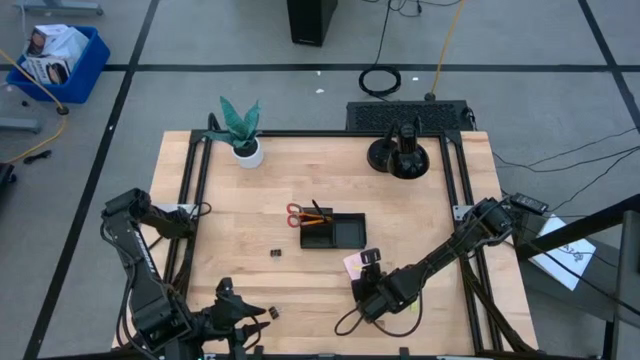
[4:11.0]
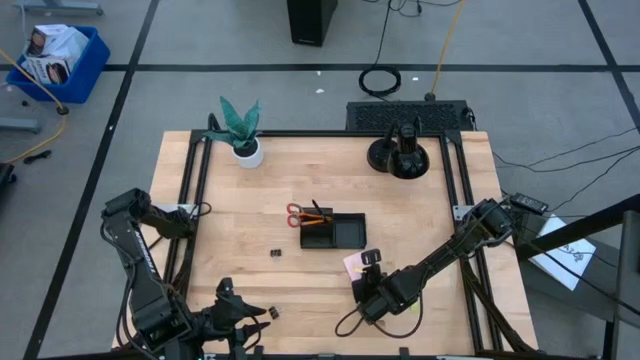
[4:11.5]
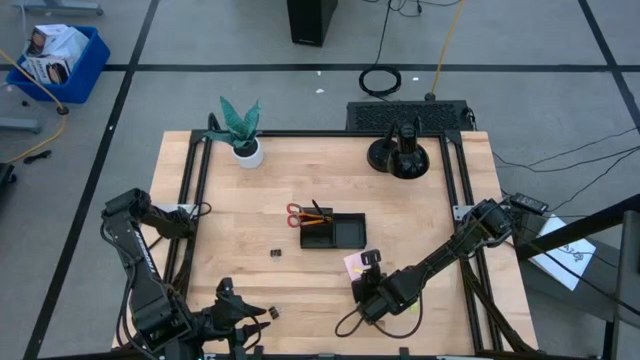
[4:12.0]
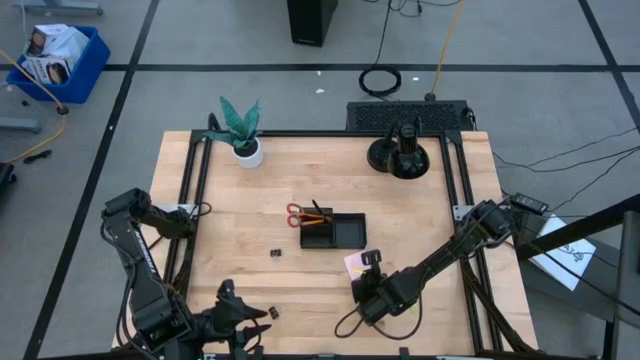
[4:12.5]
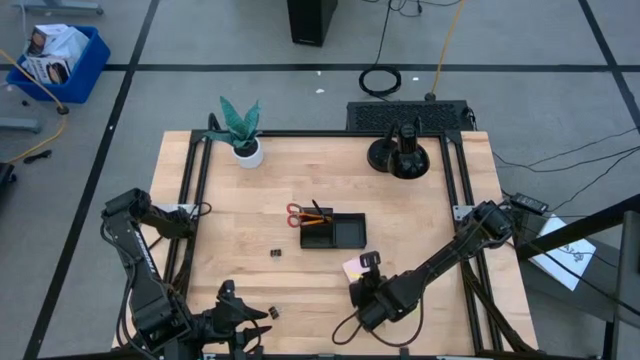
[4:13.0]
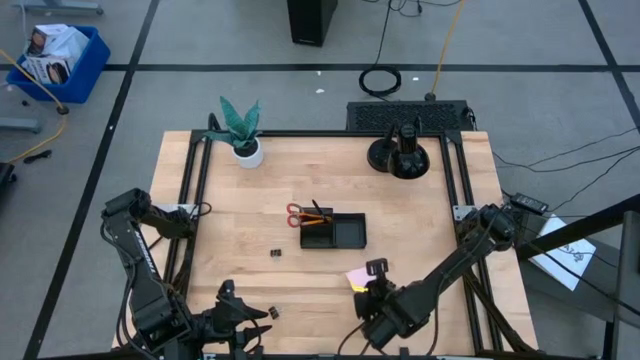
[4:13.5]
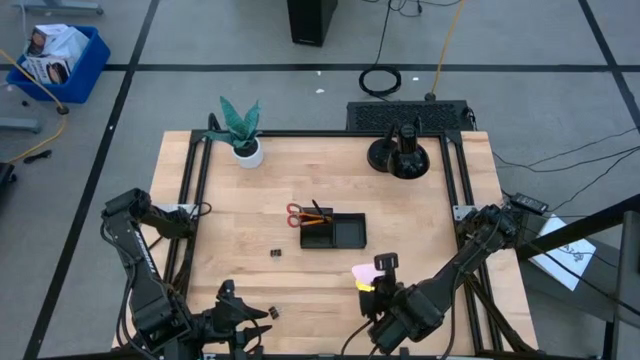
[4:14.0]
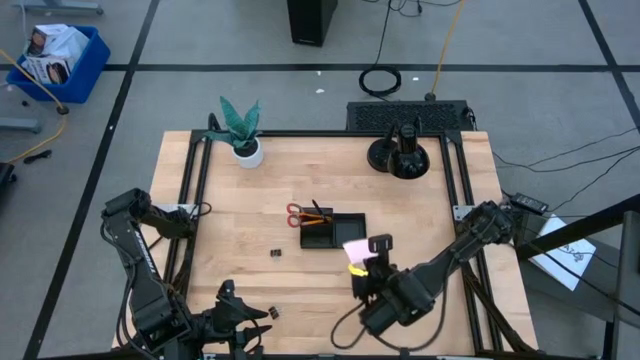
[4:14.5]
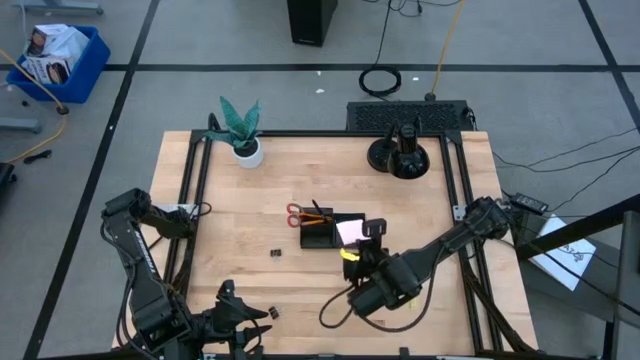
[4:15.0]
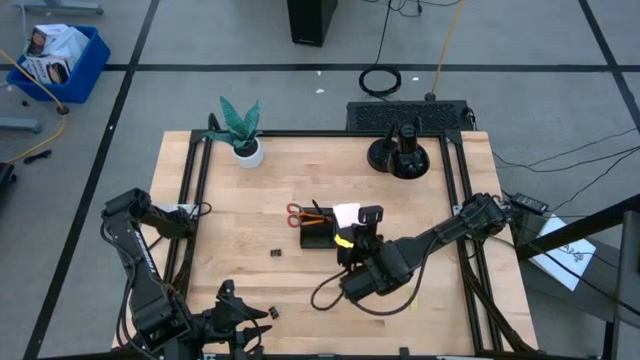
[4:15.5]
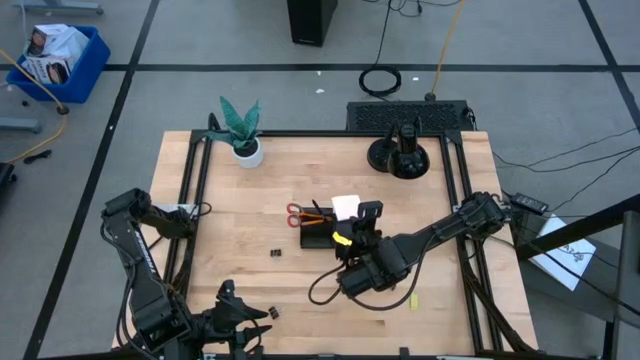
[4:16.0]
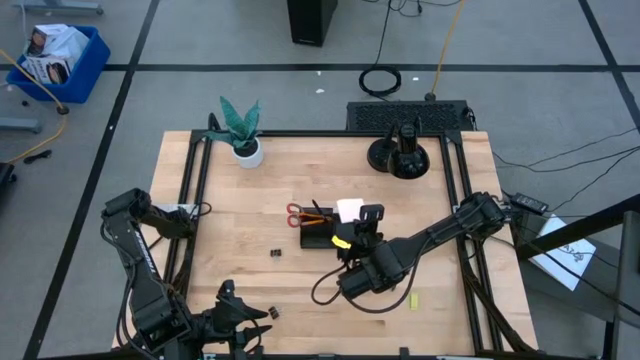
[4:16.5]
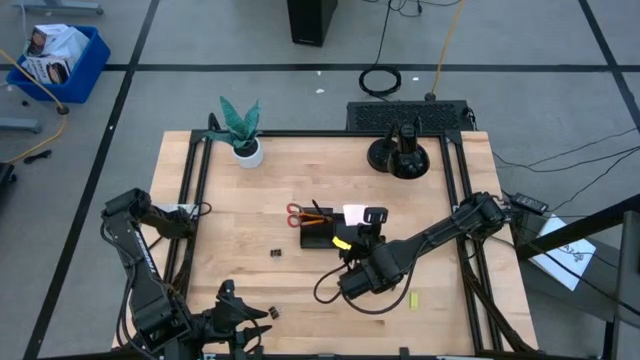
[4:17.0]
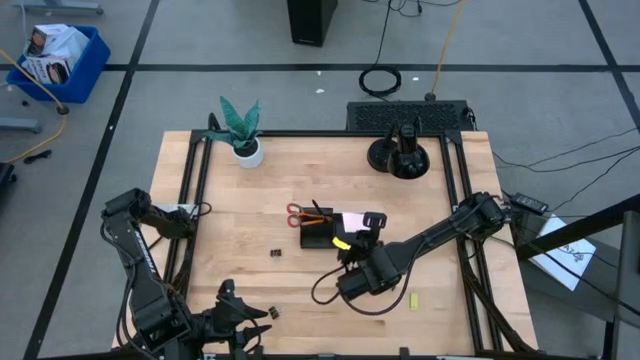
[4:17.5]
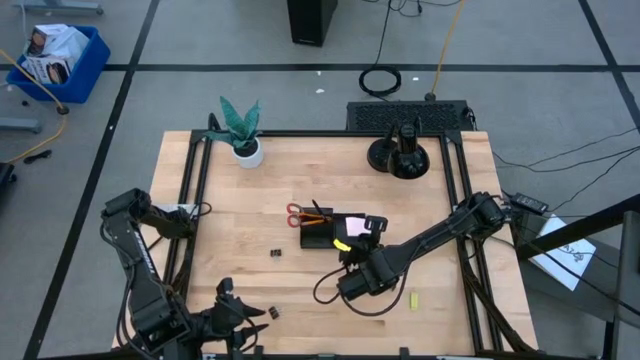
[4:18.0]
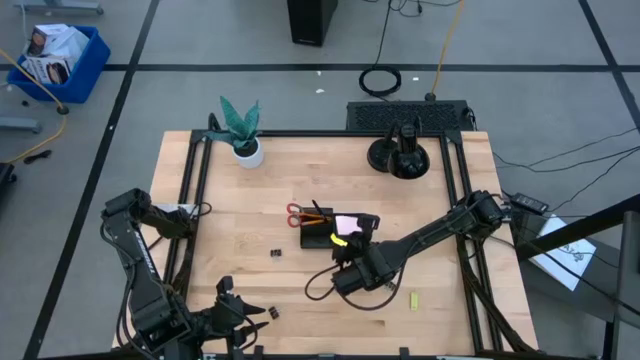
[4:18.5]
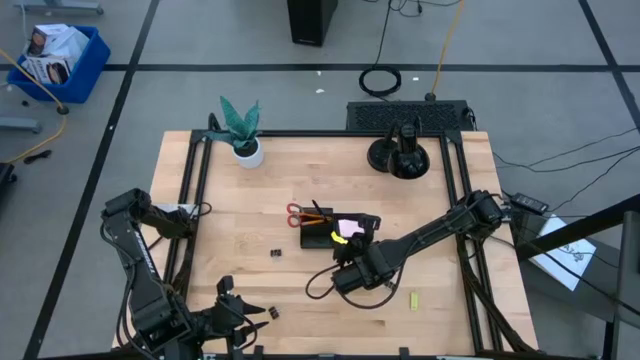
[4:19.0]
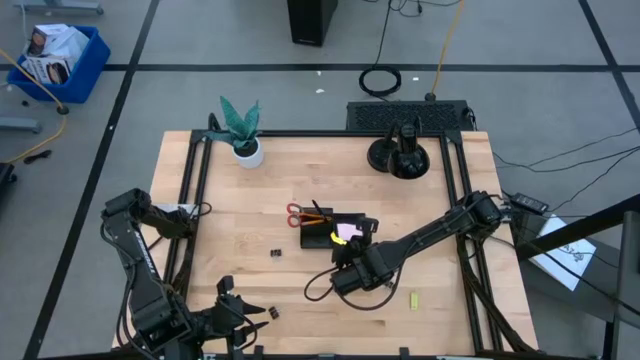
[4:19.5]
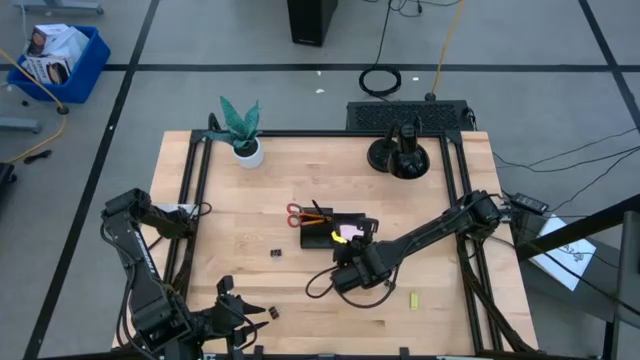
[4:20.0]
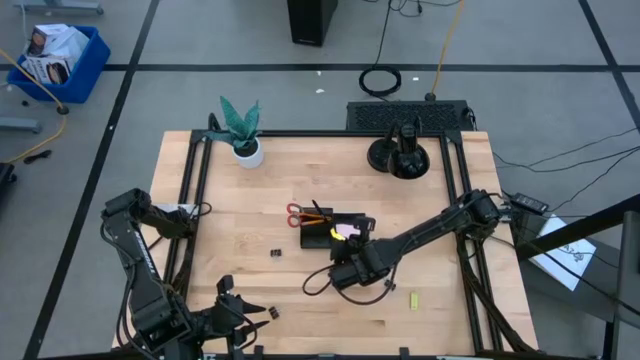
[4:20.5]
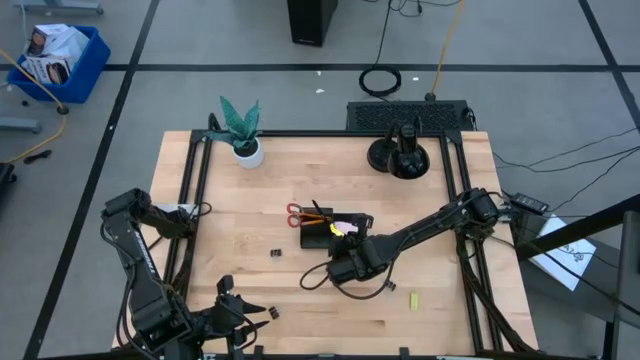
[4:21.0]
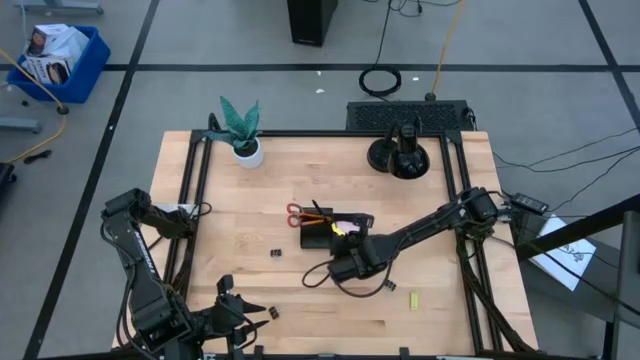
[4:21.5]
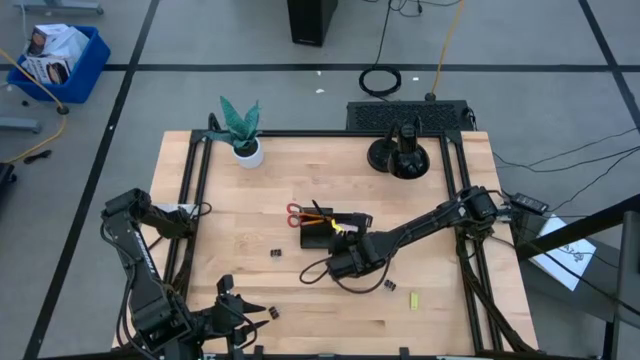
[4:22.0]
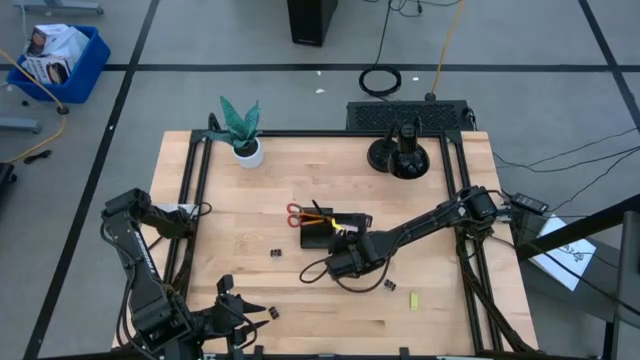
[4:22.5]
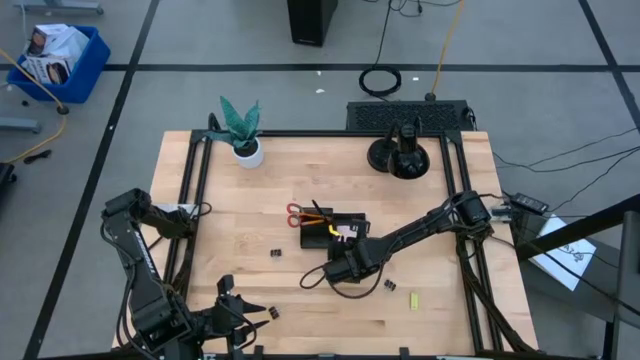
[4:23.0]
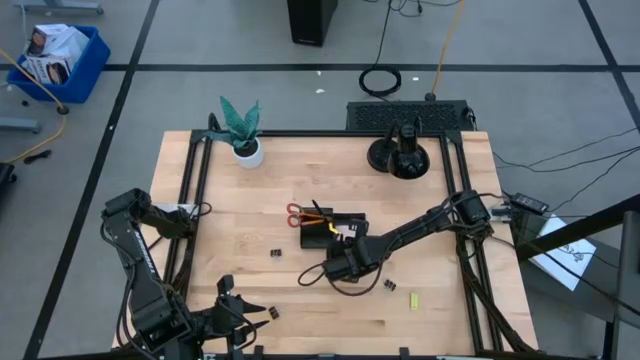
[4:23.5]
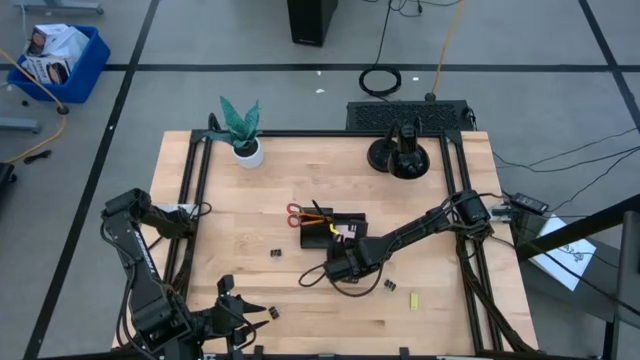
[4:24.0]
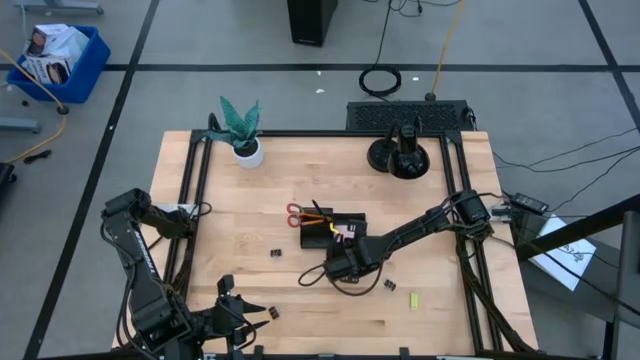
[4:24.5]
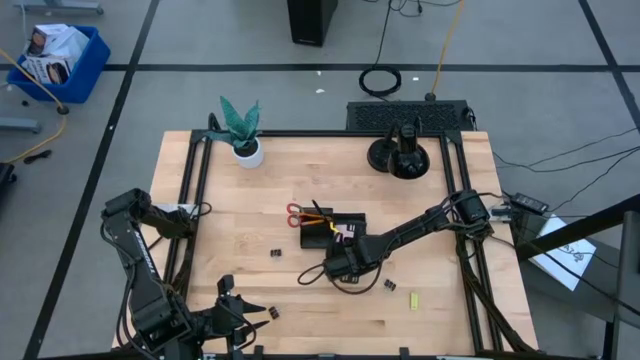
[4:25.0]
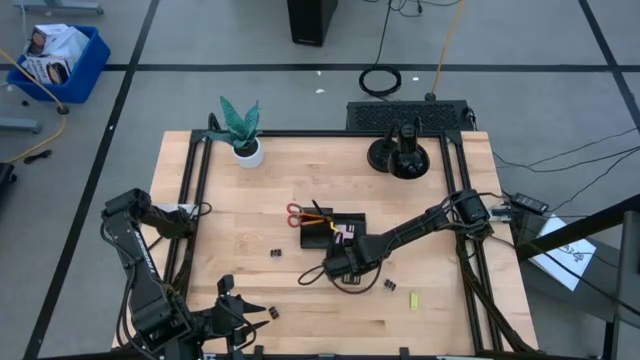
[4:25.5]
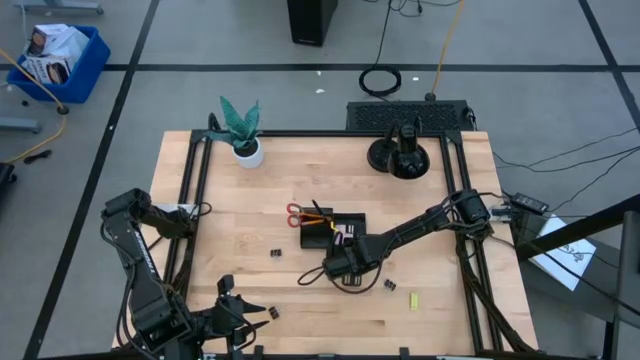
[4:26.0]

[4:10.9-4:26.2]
Task: Pick and place office supplies into organizer
Put the pink sticky notes into the desk organizer

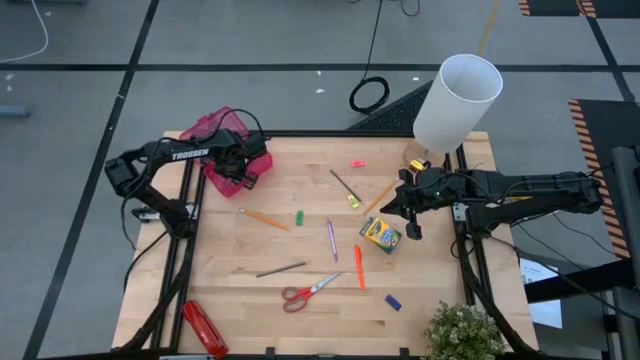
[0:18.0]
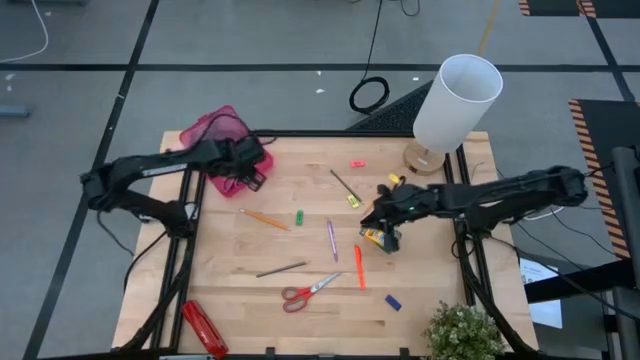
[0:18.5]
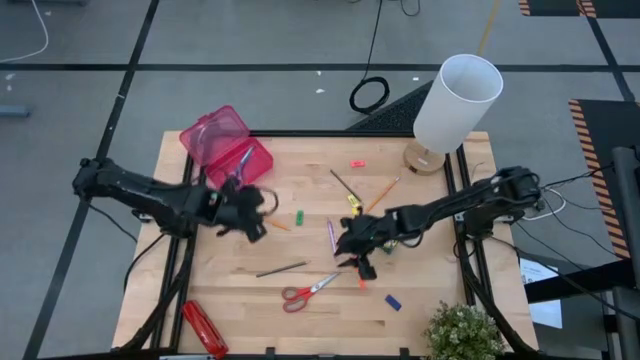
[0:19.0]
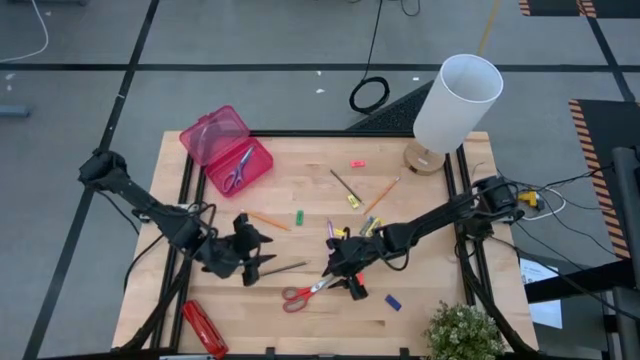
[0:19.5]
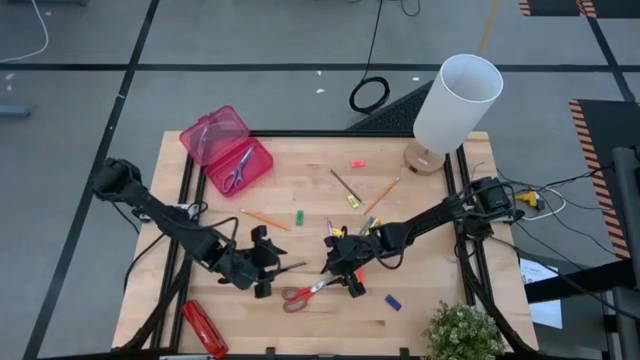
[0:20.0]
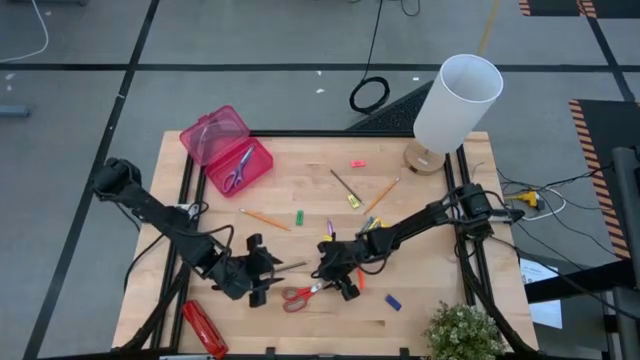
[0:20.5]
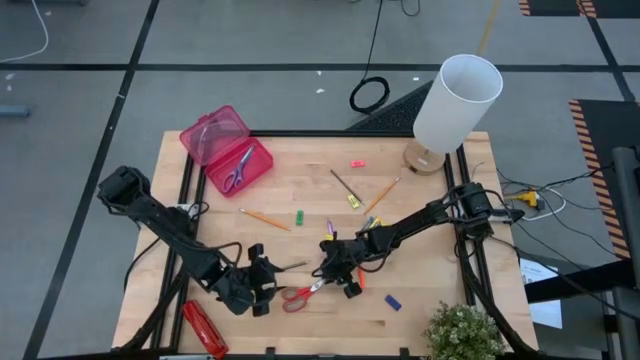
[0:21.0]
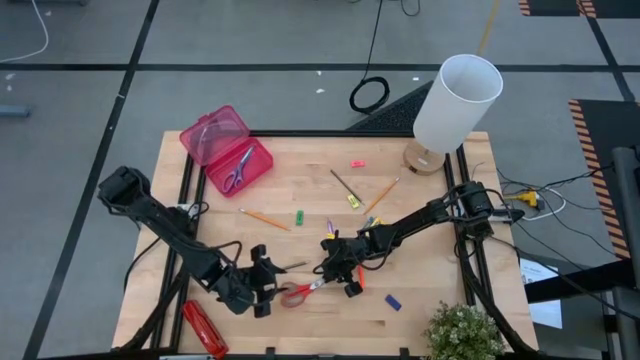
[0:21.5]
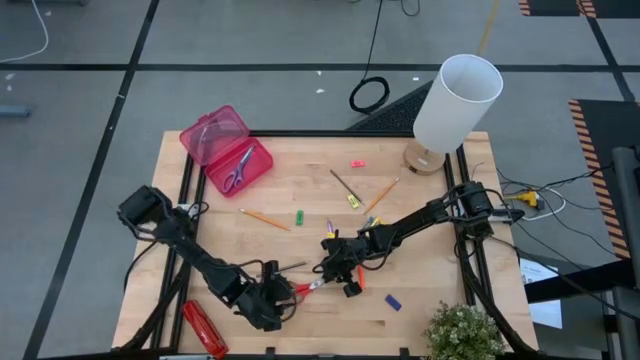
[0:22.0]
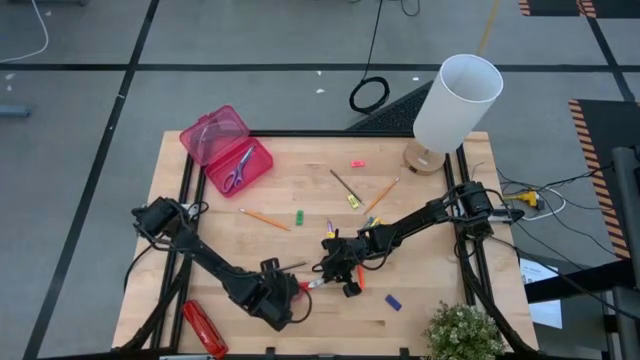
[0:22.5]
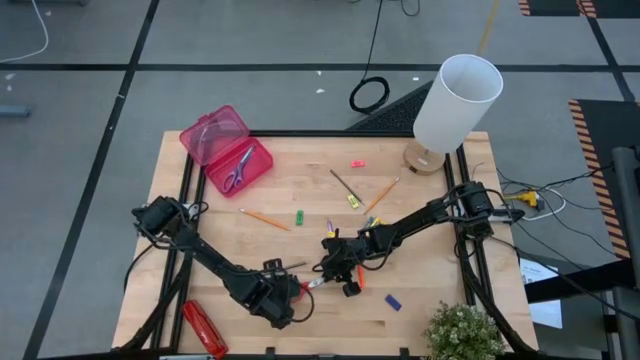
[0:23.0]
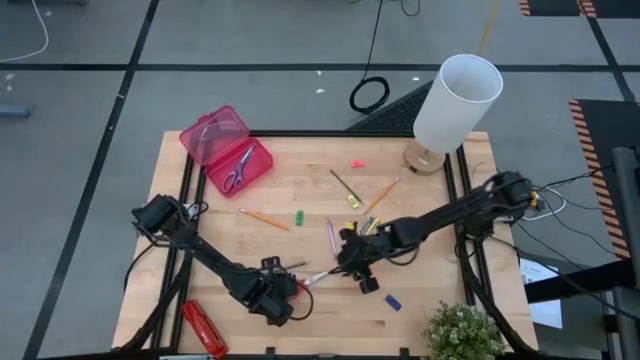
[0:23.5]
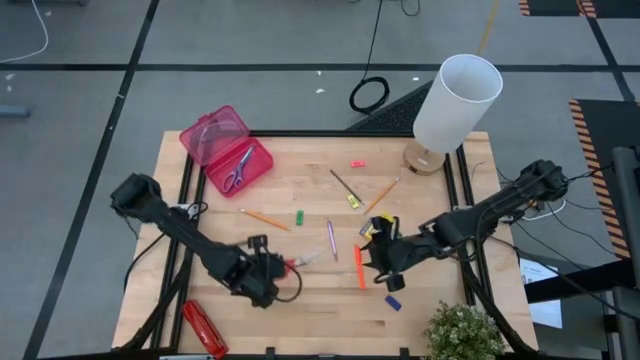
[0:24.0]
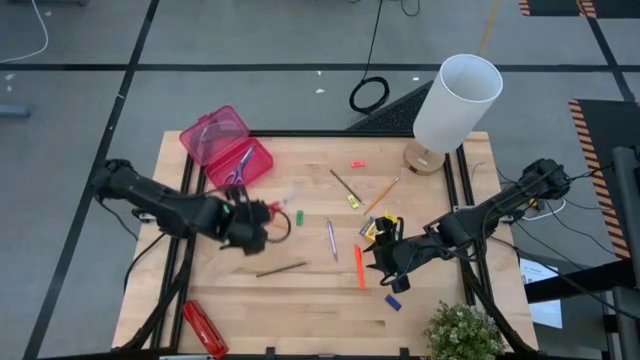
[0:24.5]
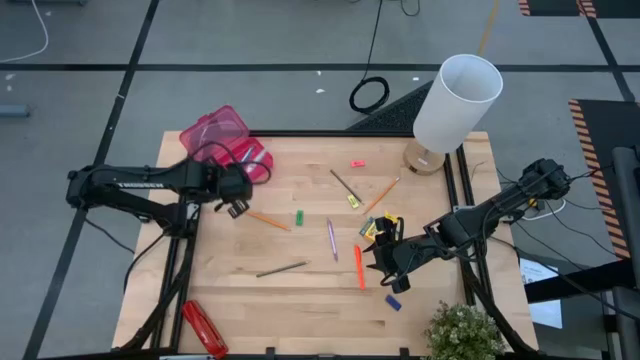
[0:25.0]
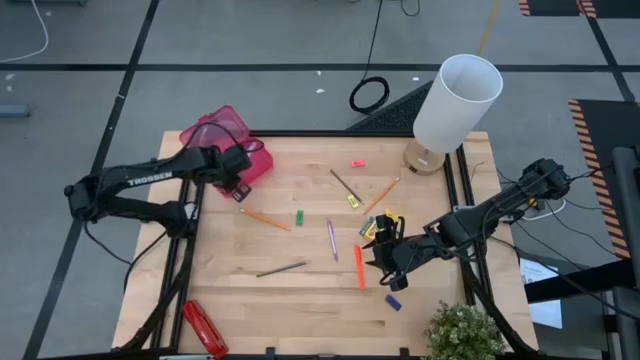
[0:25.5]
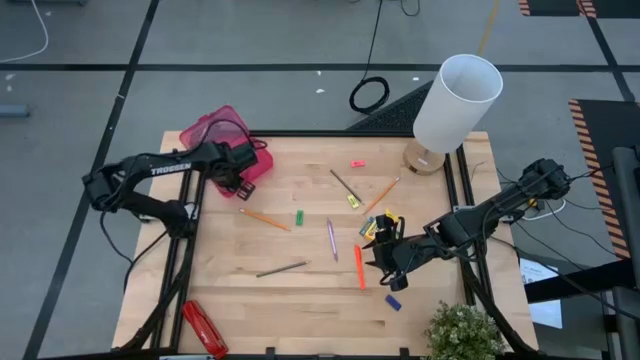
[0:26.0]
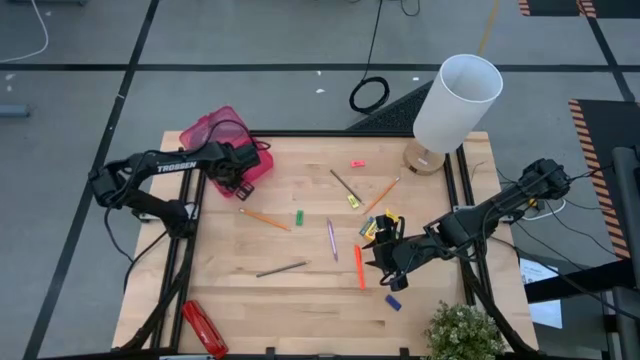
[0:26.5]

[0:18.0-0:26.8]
Task: Pack school essentials
Put the red scissors into the pink supply box
